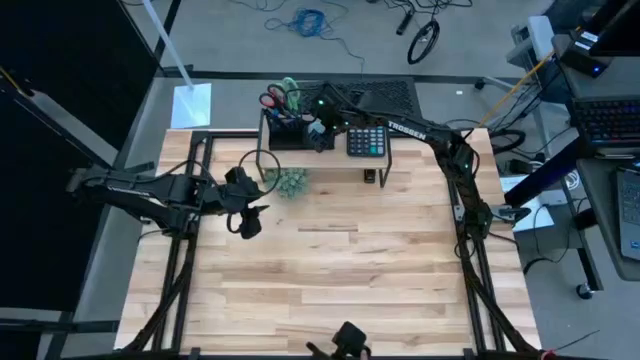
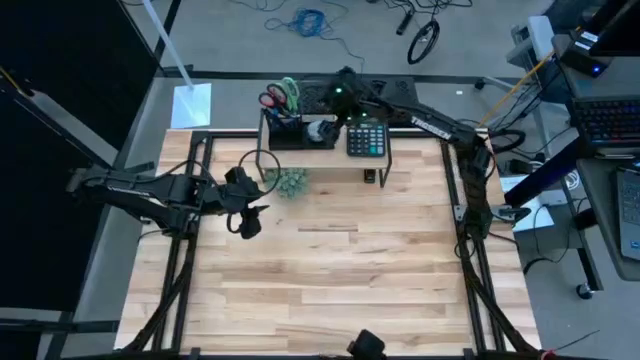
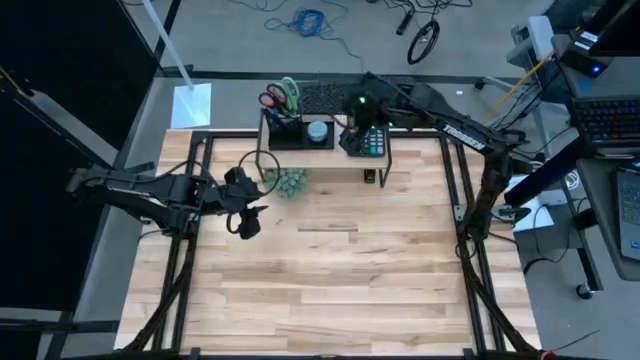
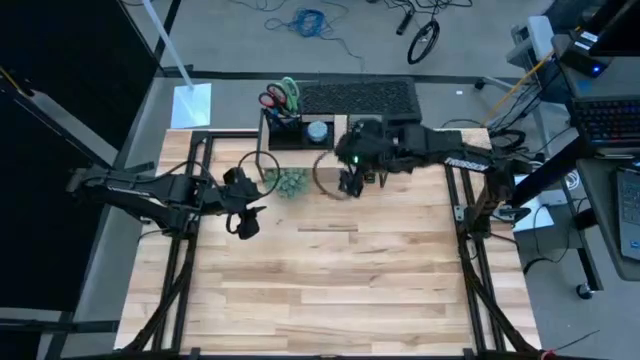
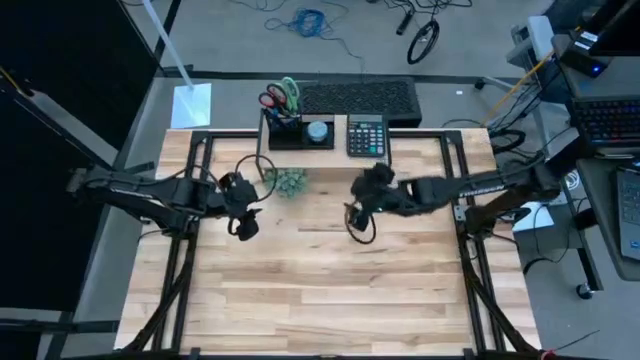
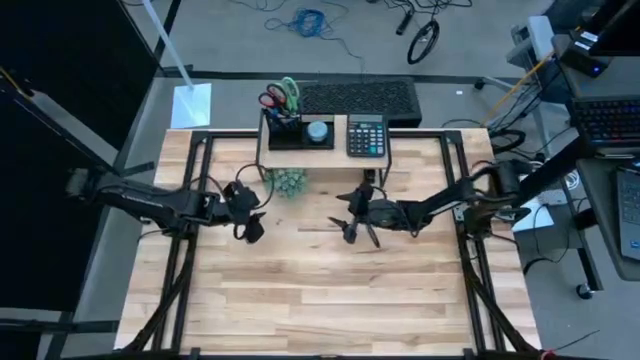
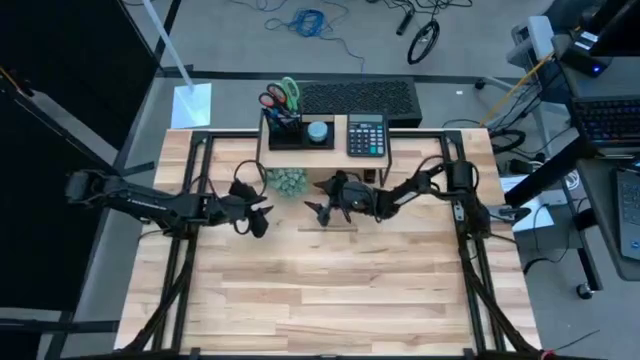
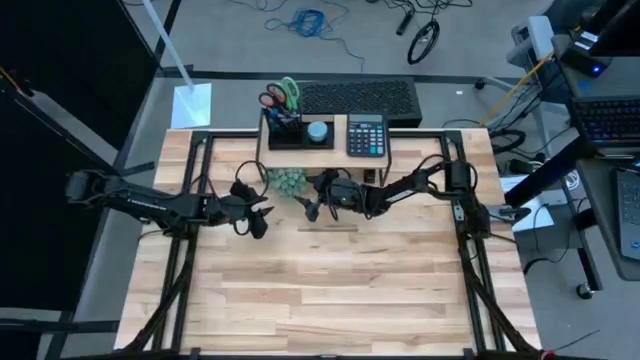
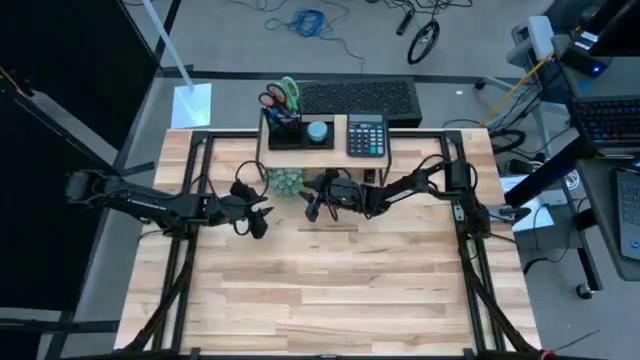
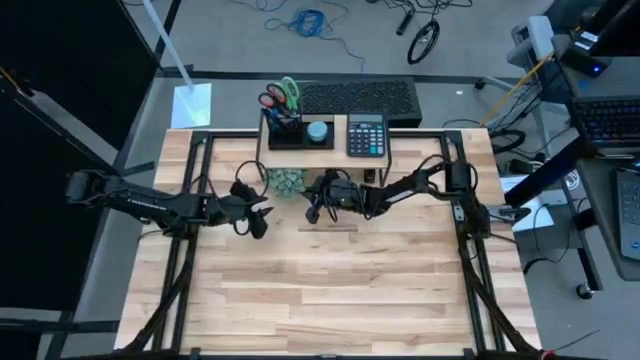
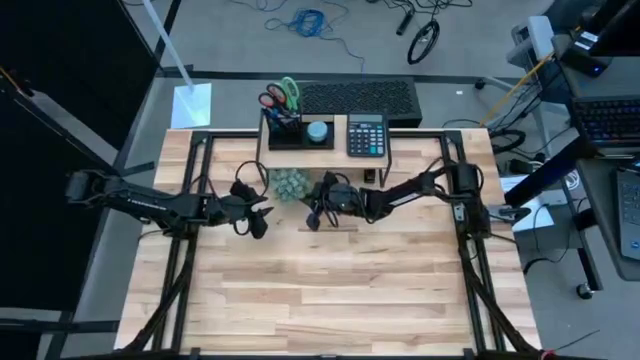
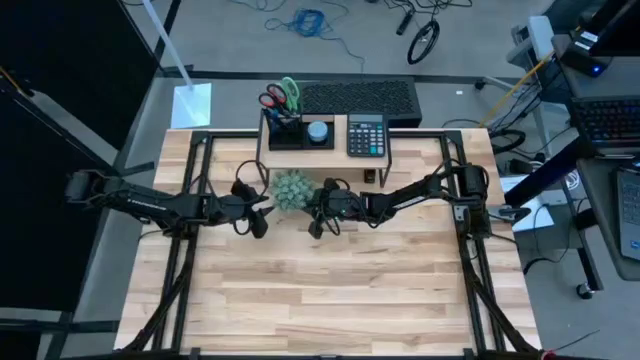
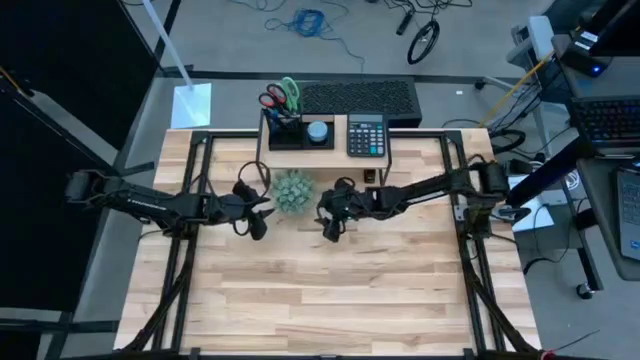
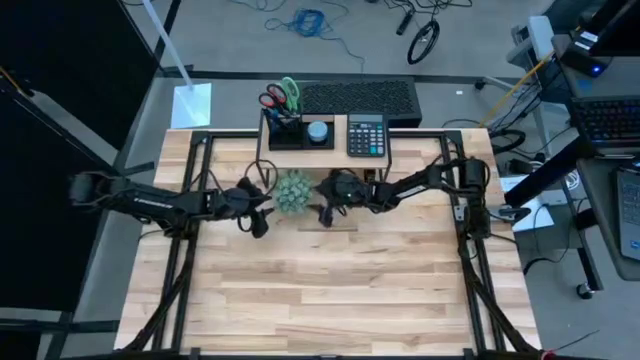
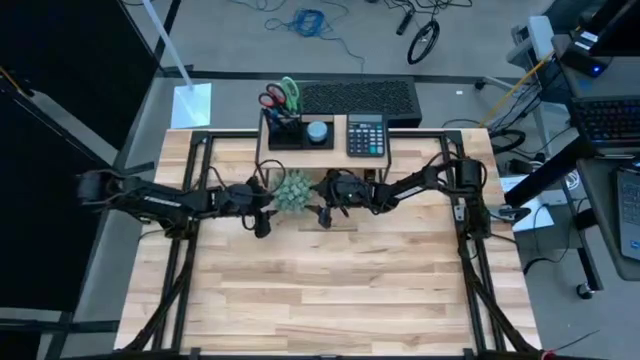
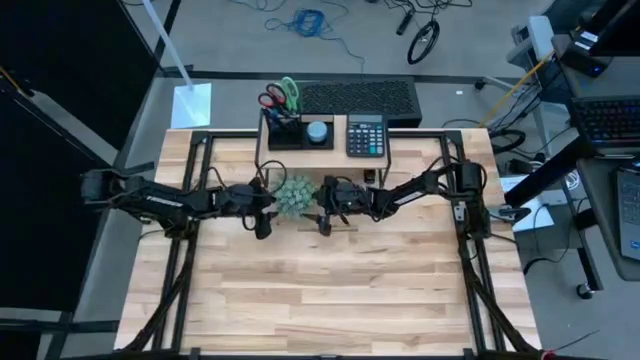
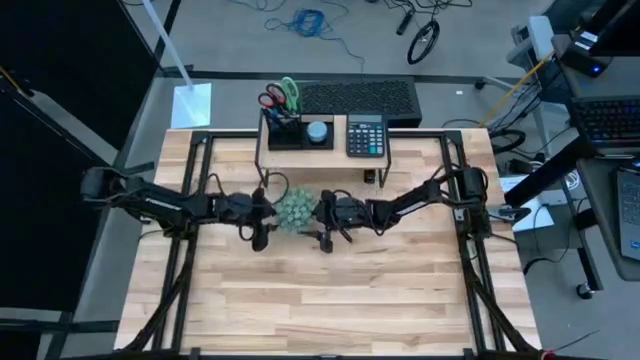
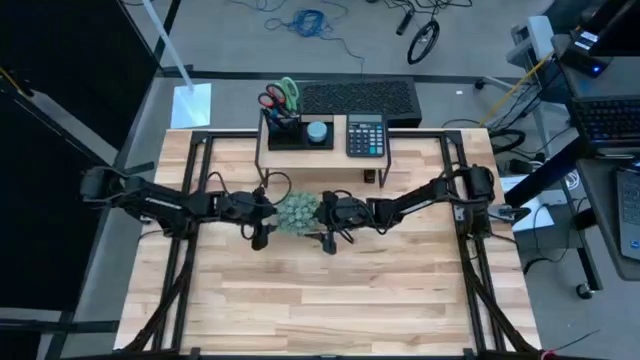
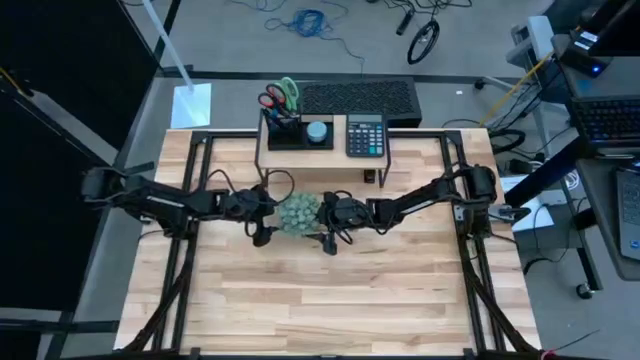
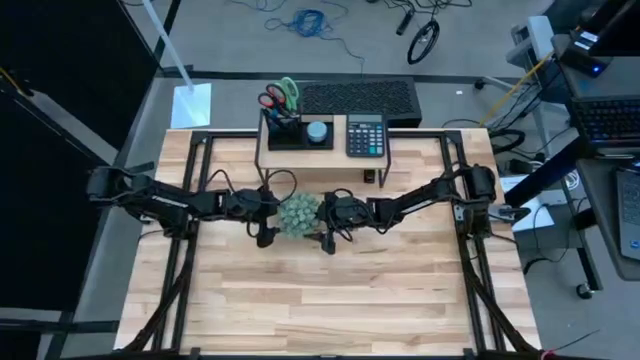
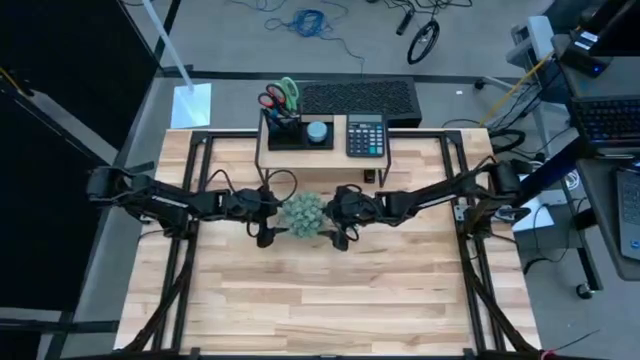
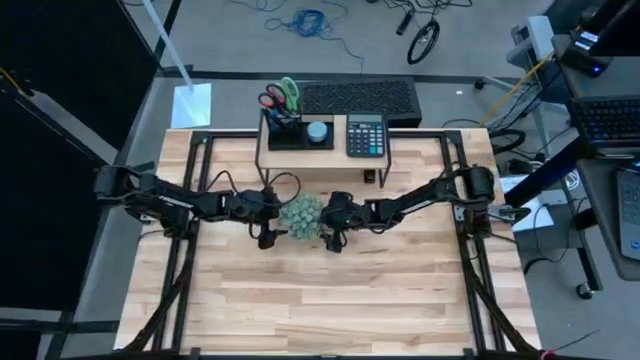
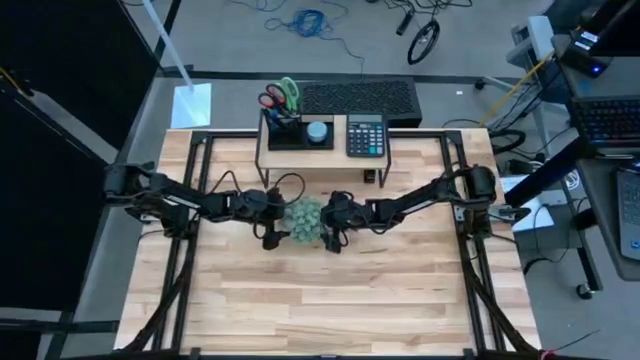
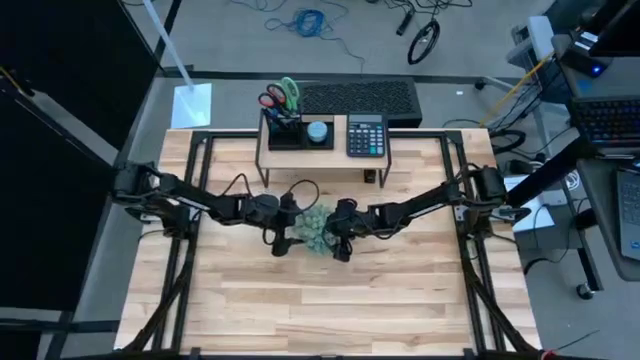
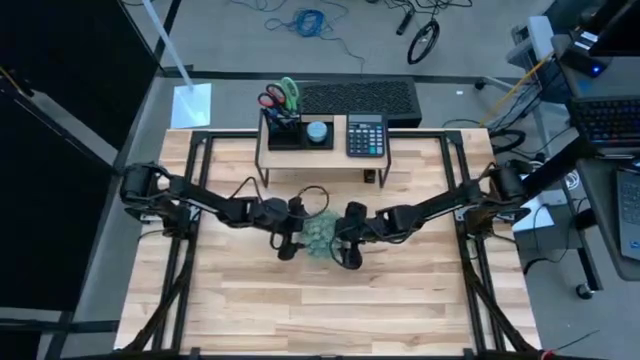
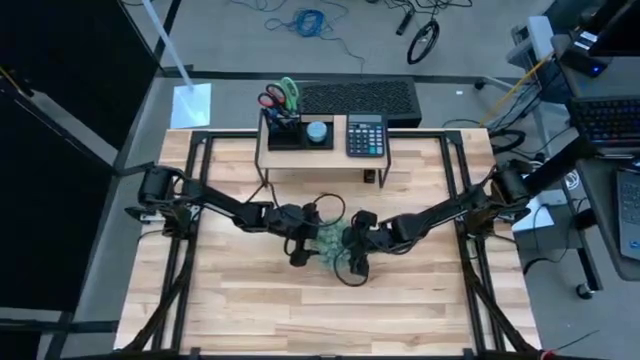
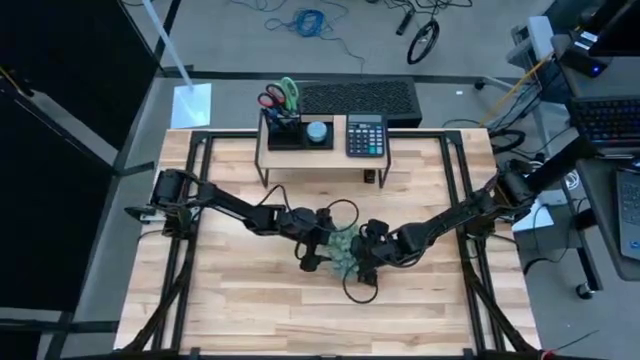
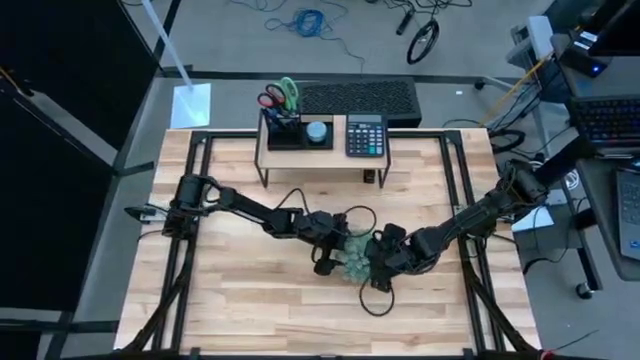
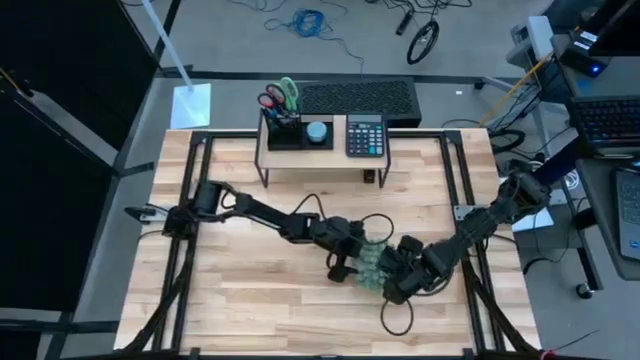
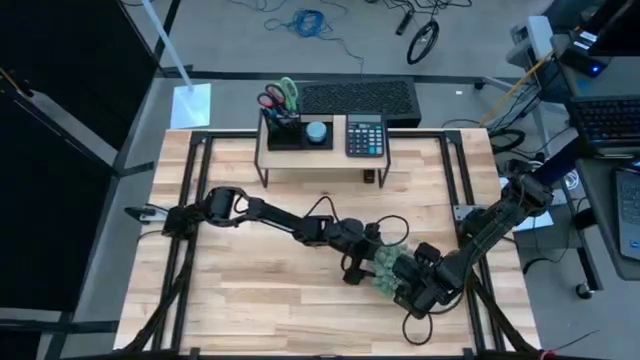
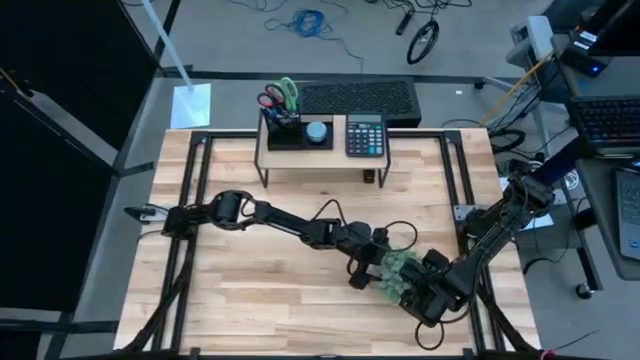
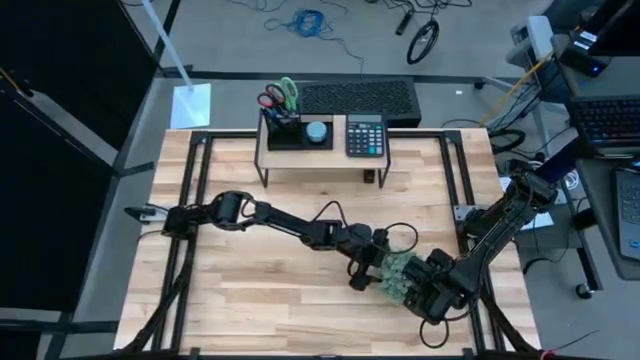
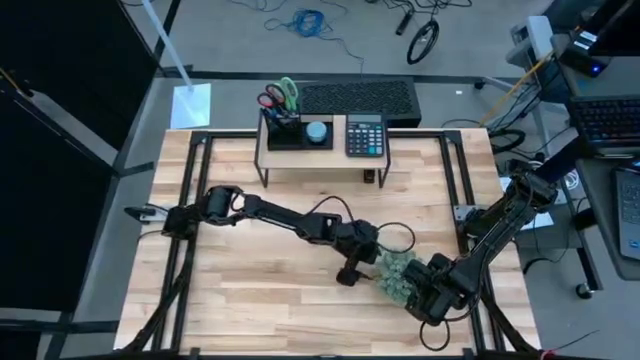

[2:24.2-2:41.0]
Task: Pick and place office supplies into organizer
Move the green plant to the bottom right of the table

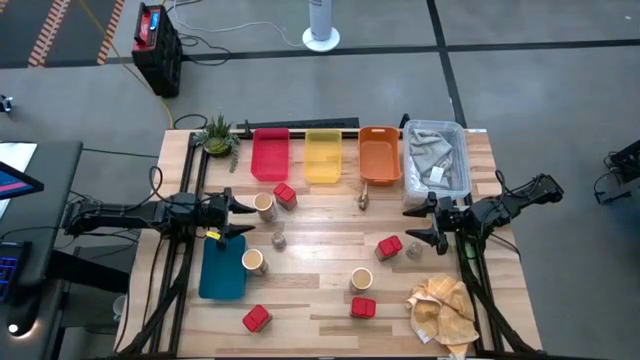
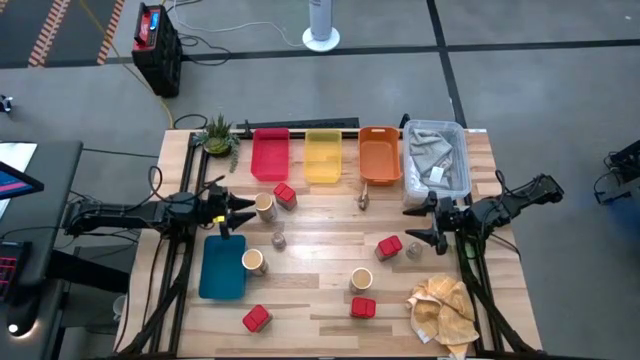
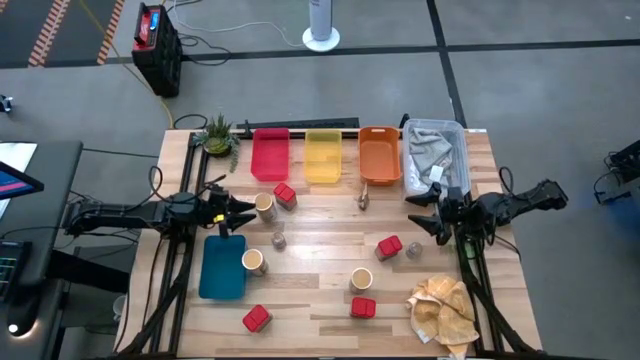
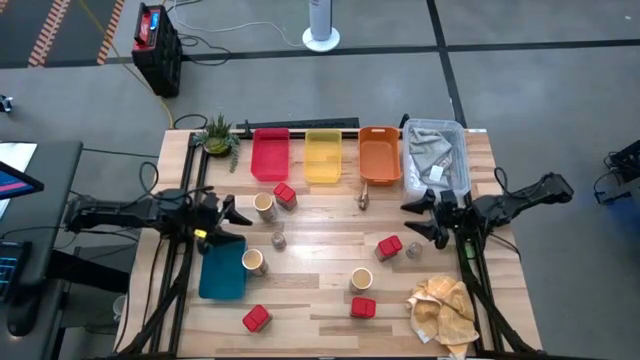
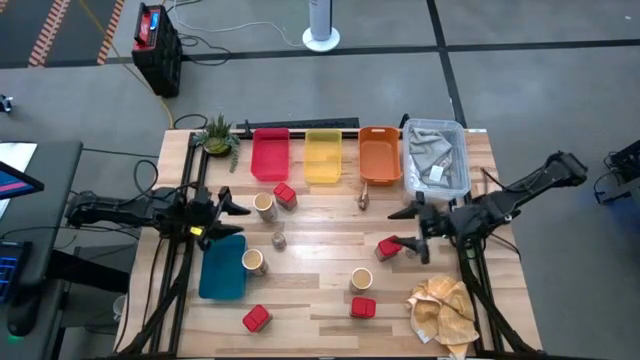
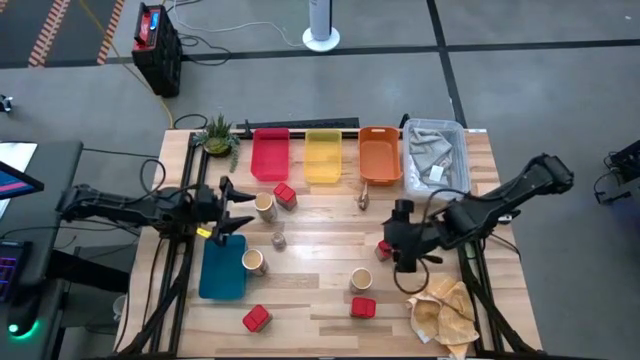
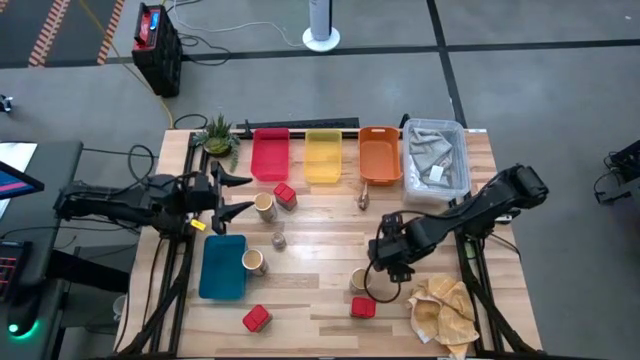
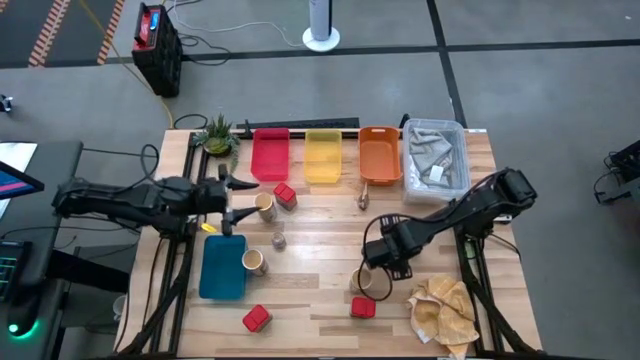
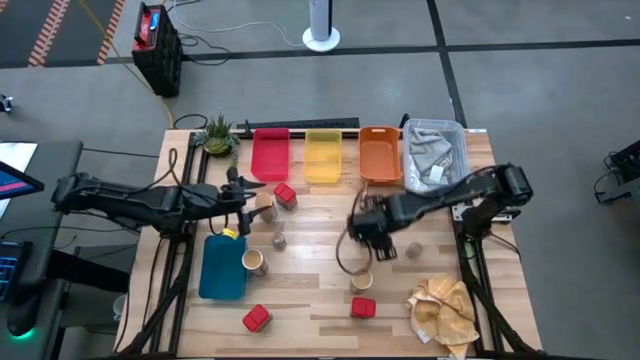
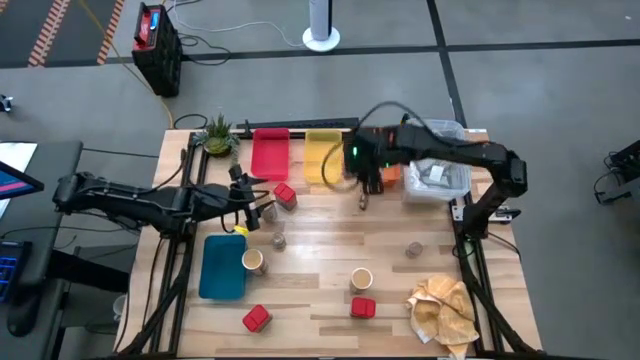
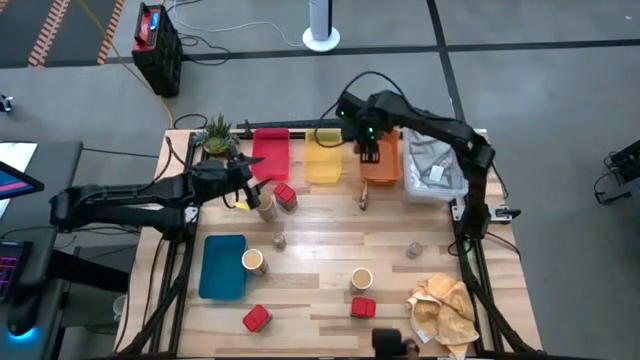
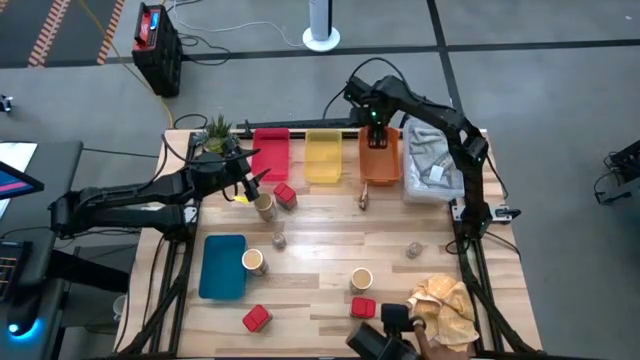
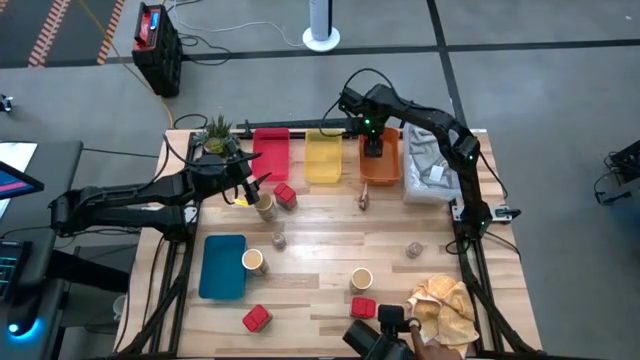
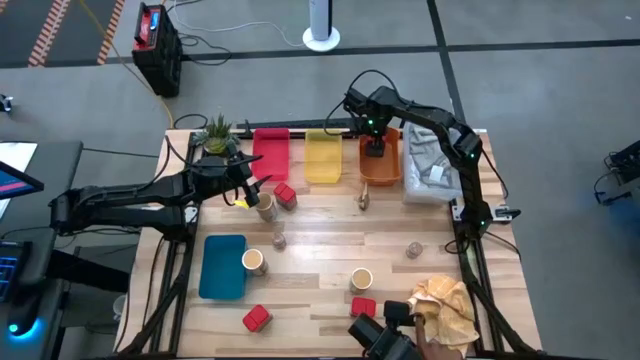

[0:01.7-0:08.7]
Task: Sort spices by type
Put the red seasoning can into the orange bin
